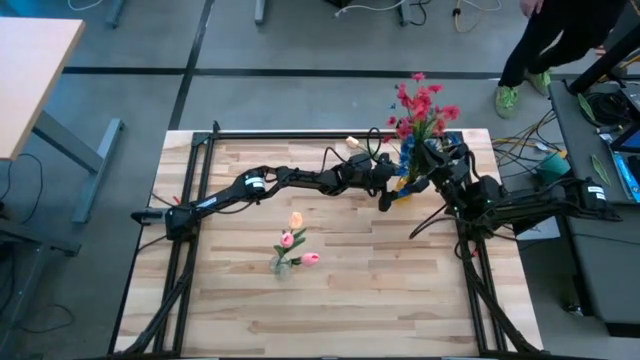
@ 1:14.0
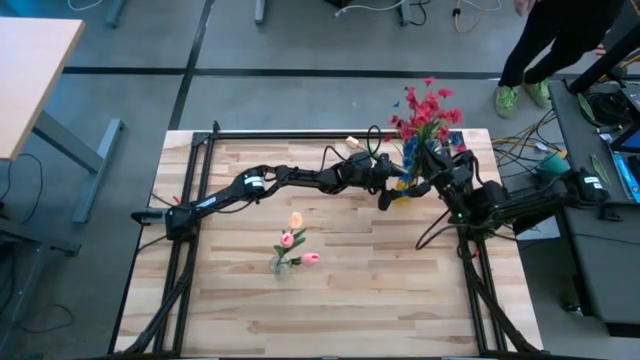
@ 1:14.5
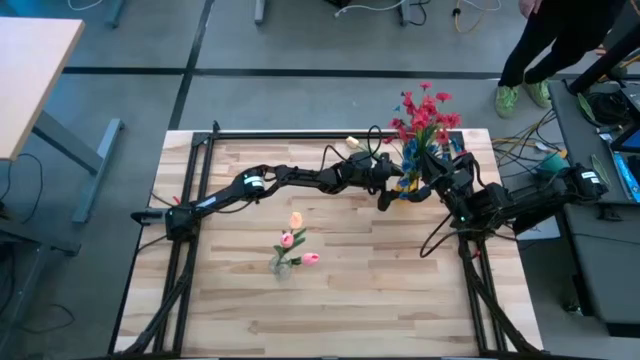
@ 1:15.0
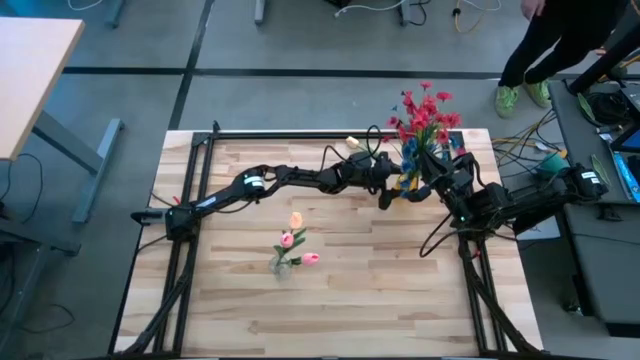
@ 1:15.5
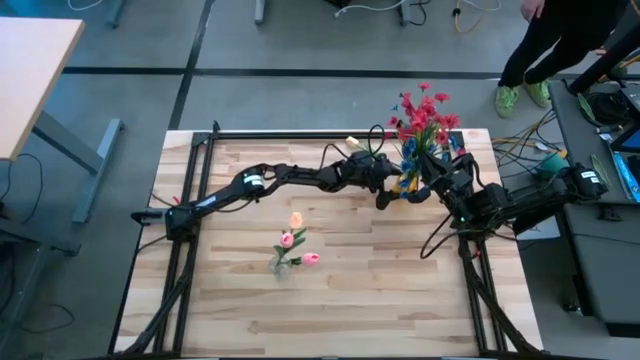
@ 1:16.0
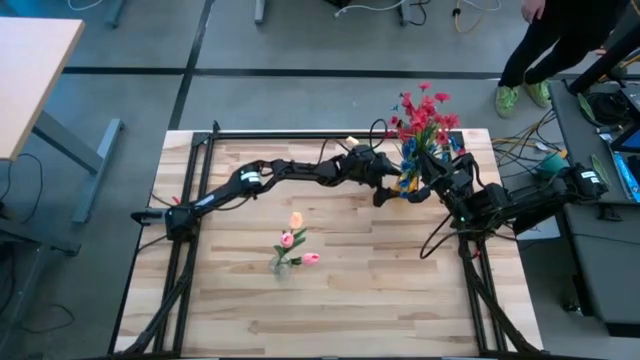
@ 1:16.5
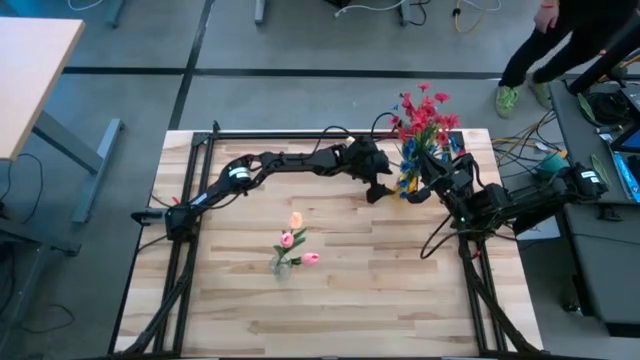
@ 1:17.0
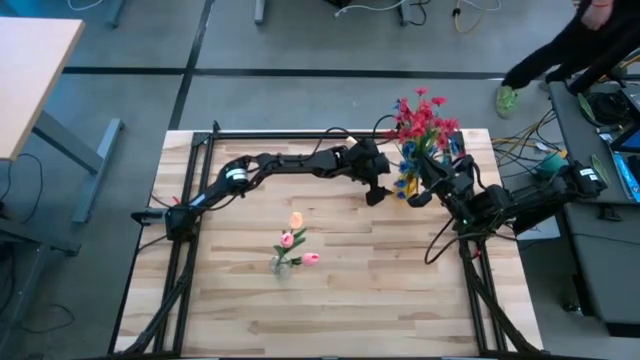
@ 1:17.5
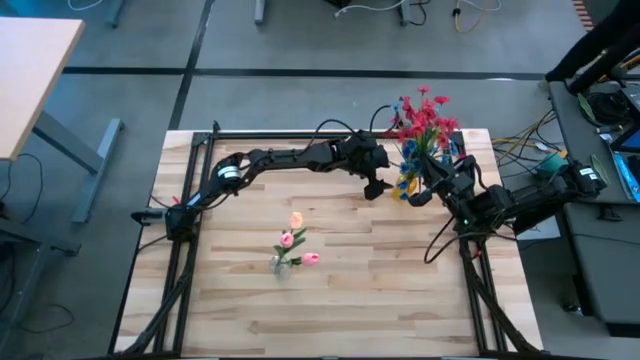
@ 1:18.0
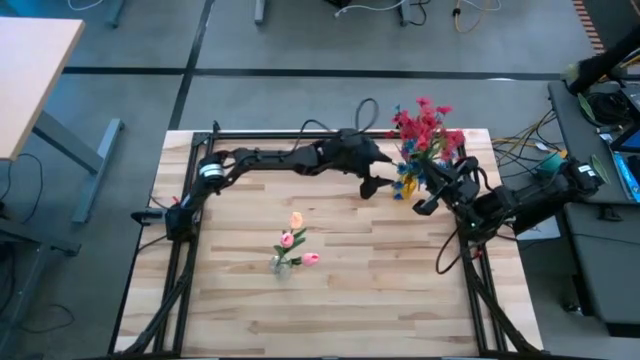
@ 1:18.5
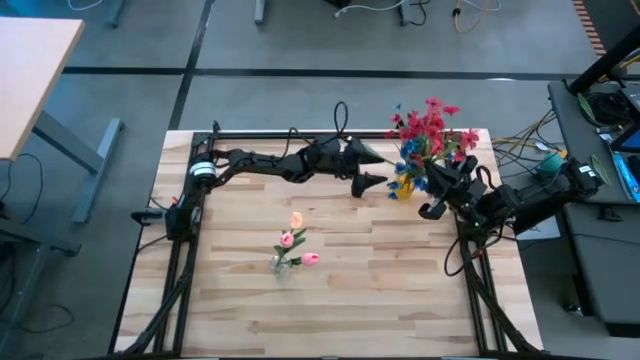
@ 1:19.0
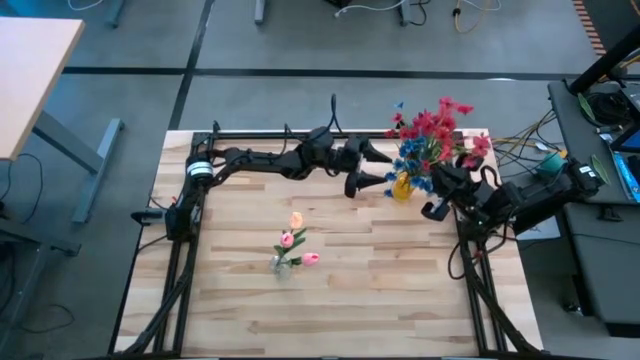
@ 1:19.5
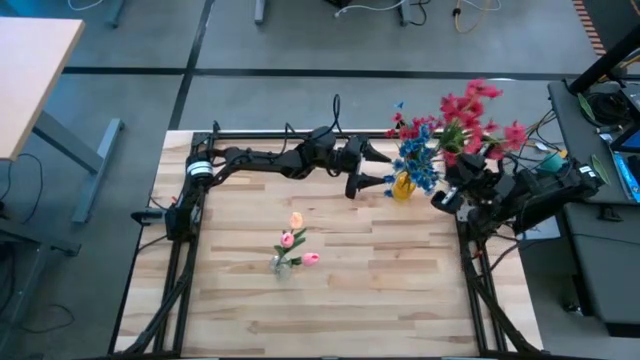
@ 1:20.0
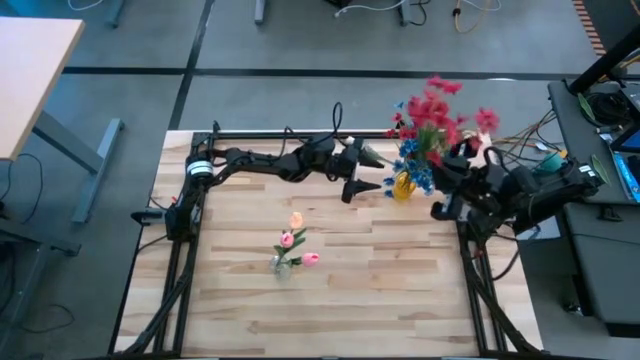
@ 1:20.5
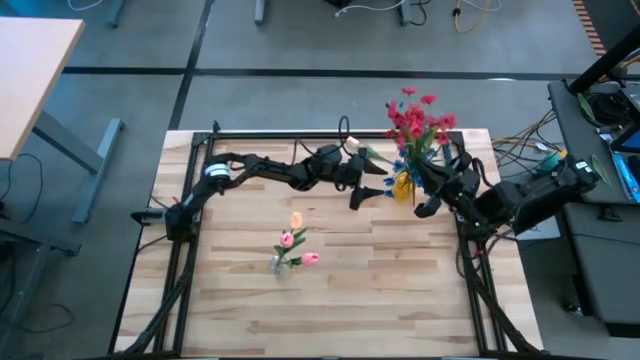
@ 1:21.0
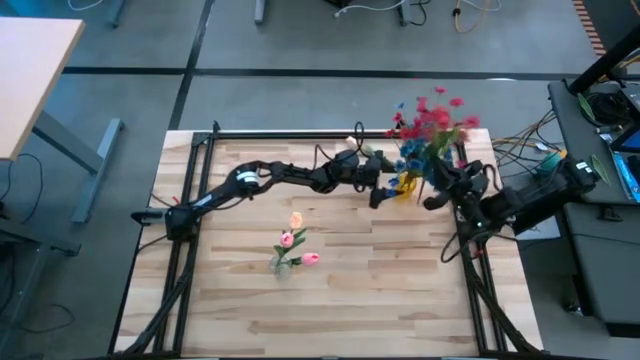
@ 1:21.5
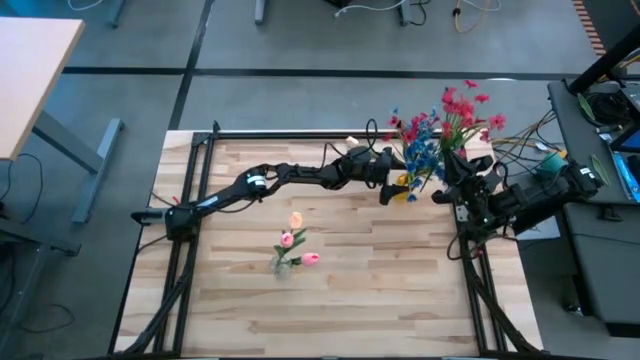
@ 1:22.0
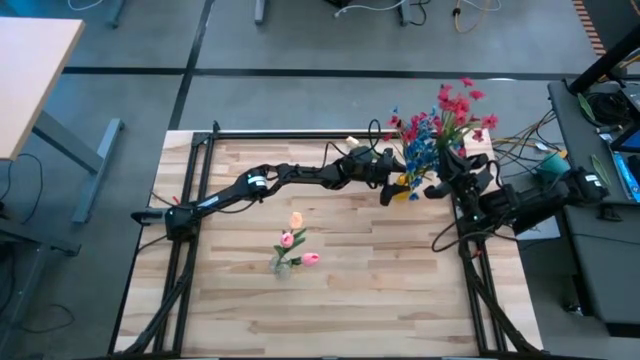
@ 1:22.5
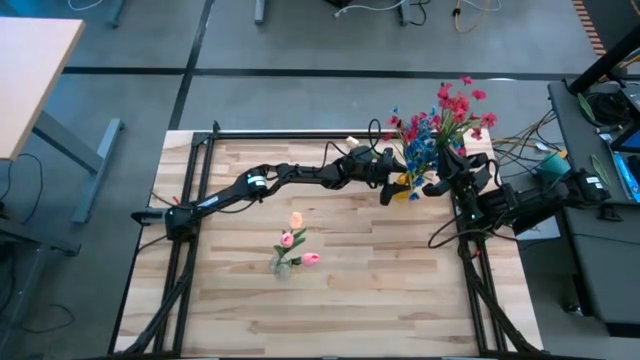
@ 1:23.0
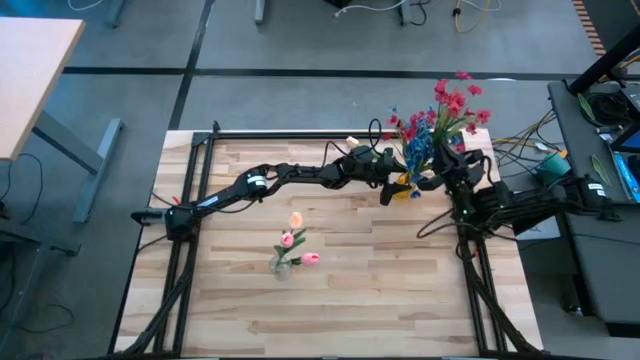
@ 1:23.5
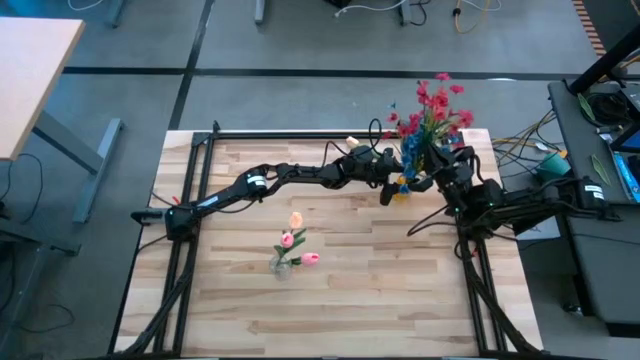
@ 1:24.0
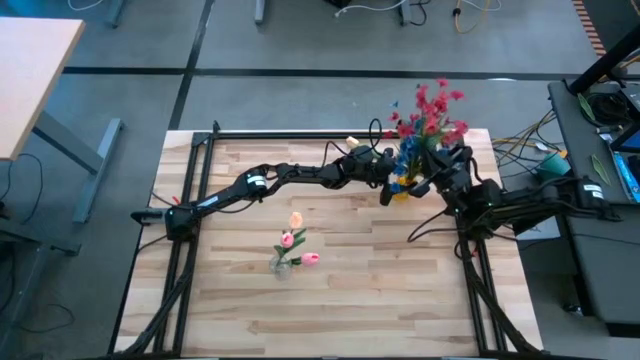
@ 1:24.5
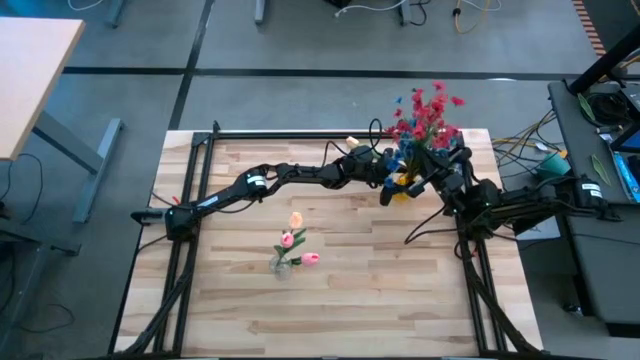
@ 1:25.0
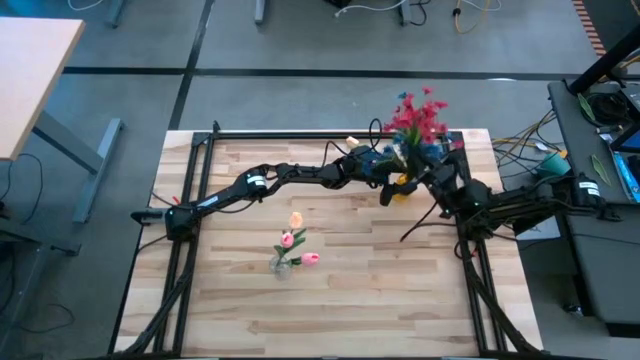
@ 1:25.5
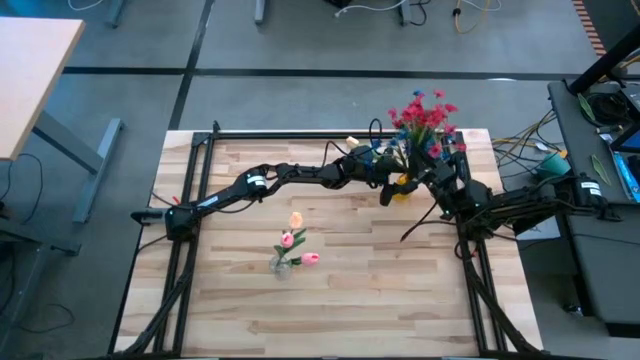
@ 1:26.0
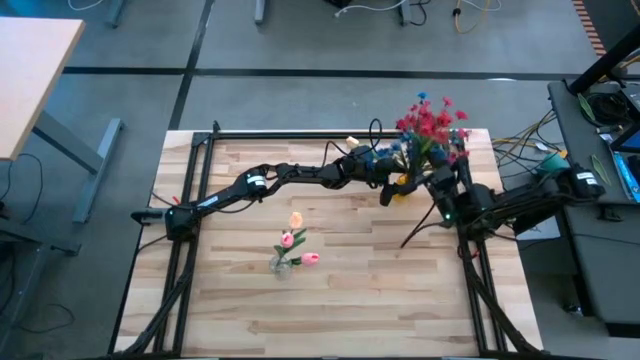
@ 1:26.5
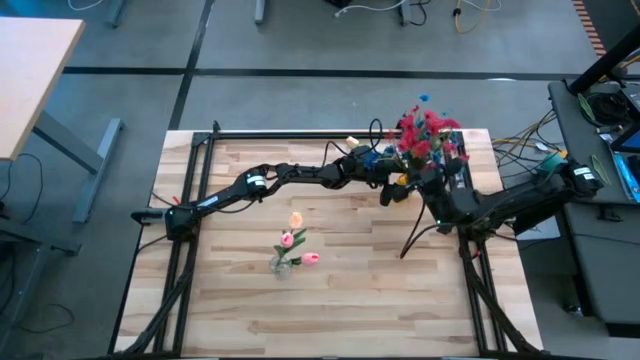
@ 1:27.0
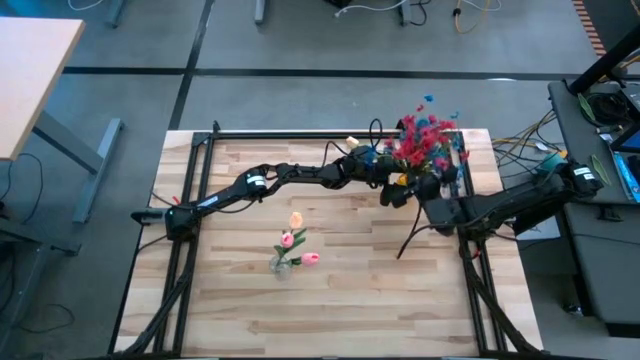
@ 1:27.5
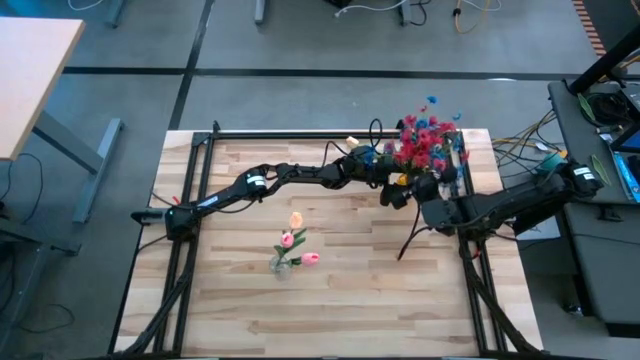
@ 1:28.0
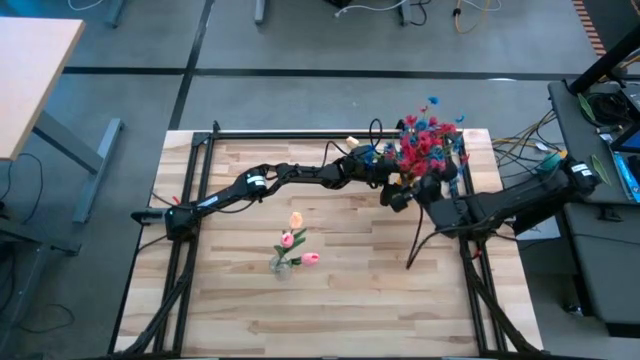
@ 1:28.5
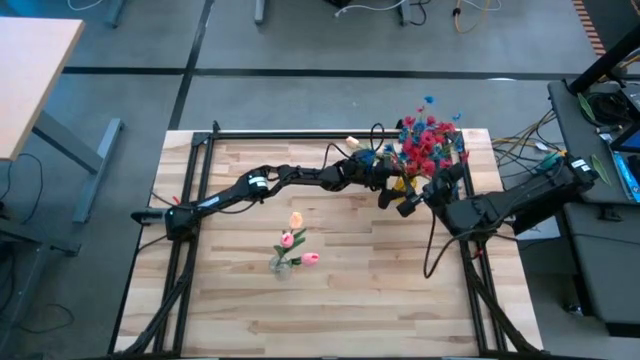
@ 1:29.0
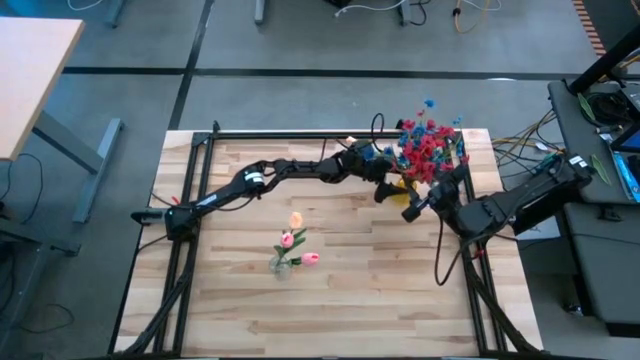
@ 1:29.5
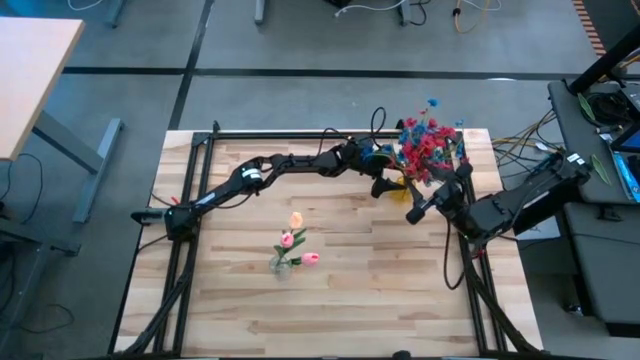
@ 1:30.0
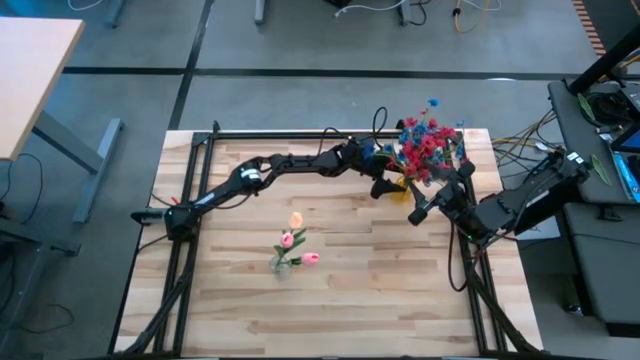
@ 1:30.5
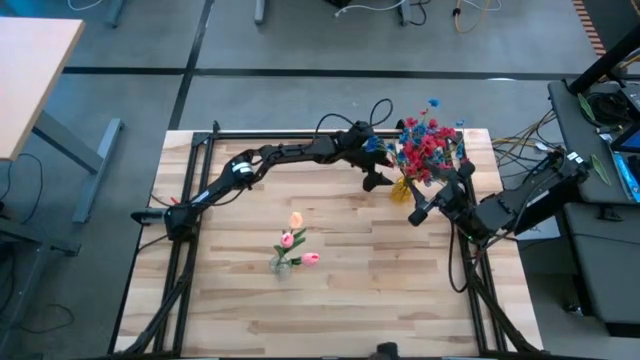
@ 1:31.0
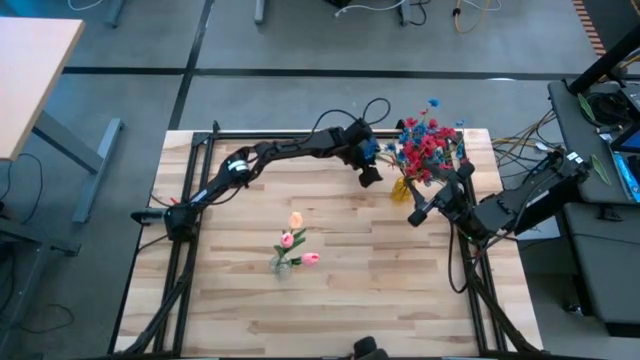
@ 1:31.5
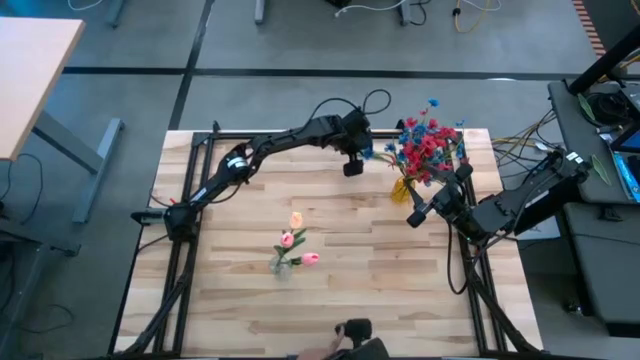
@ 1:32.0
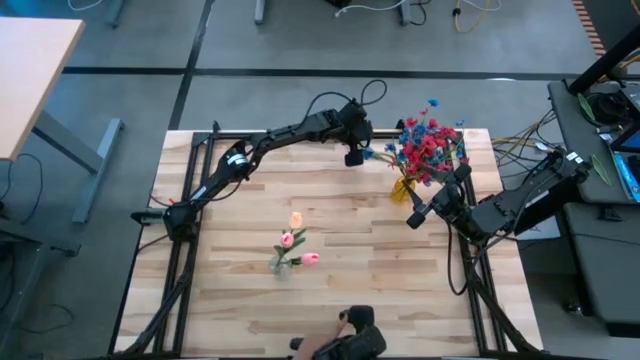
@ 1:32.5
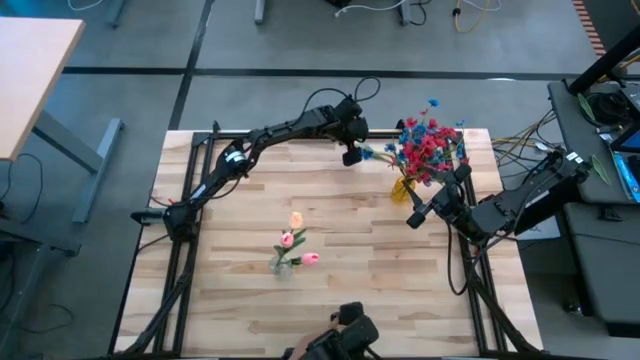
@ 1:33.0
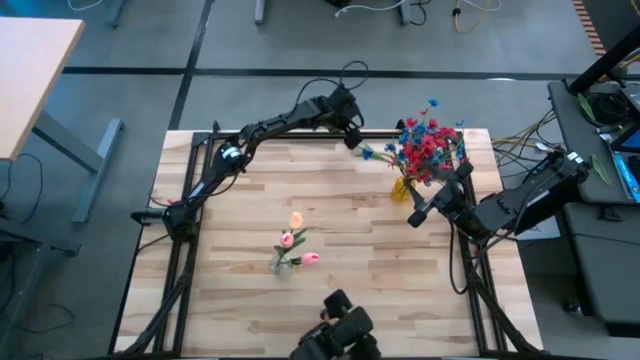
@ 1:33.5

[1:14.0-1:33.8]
Task: Sort flowers into vase by color
Put the red flowers into the yellow vase

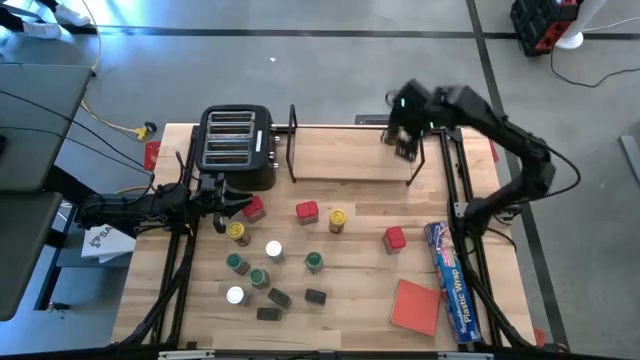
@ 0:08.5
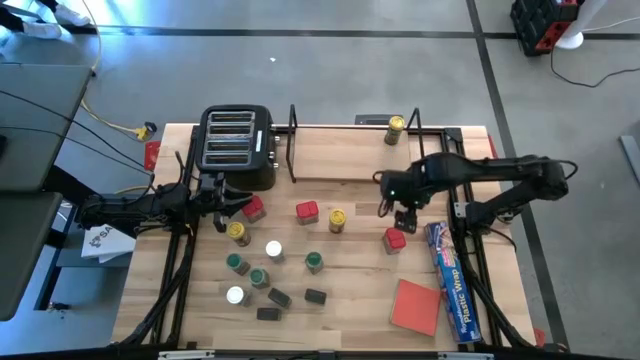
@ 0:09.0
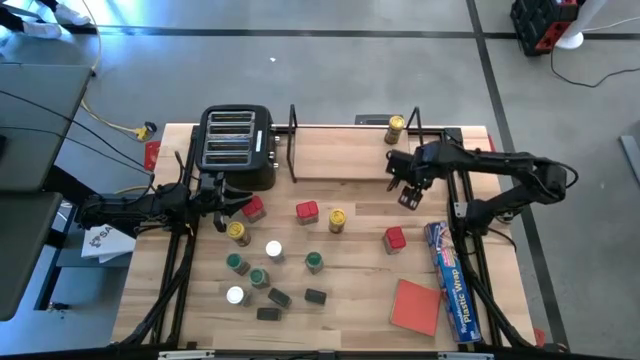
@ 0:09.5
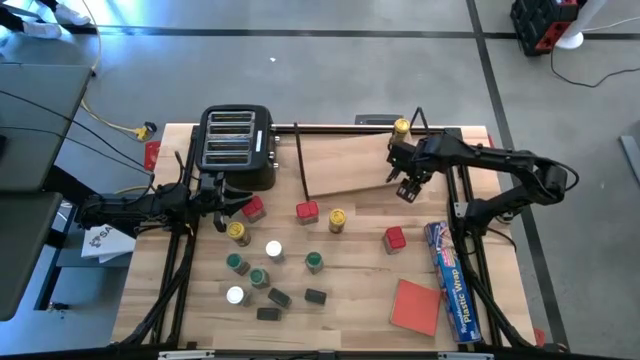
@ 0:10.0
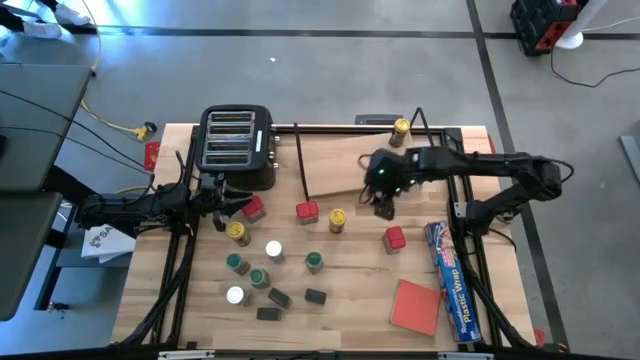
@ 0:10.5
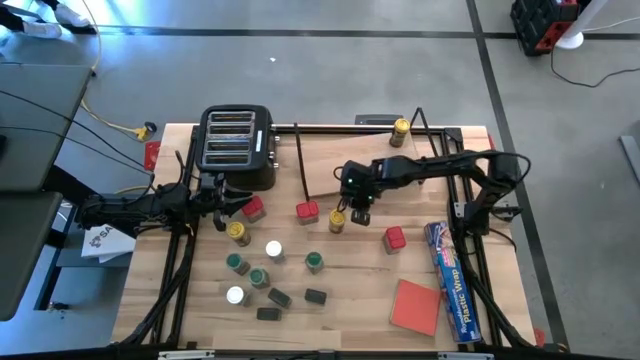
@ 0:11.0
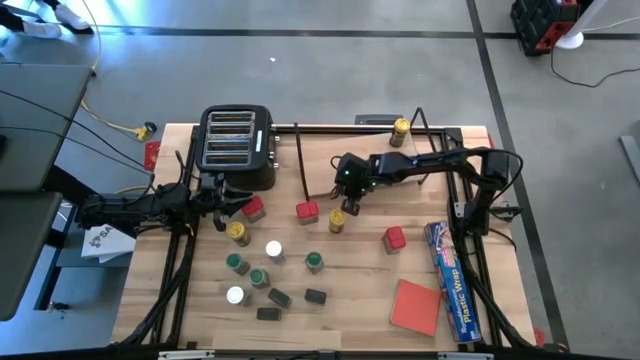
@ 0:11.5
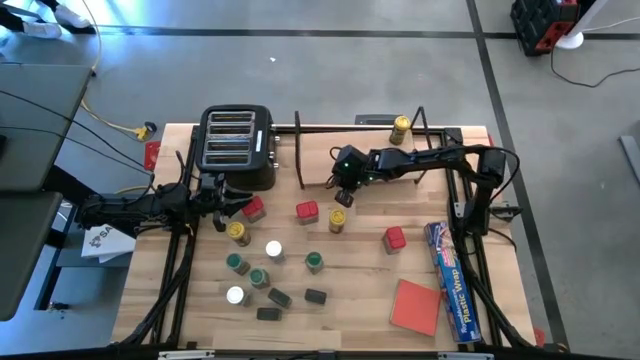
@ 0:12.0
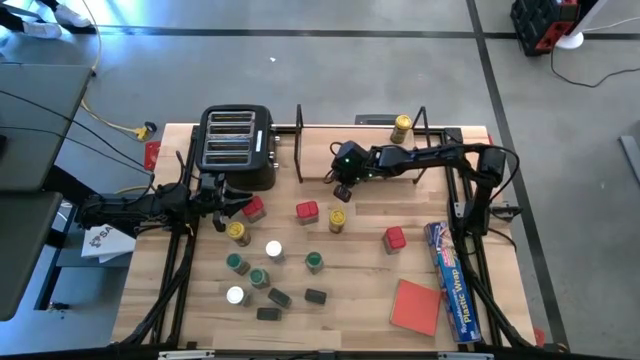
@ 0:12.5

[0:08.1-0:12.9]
Task: Shelf spices
Adjust the shelf
